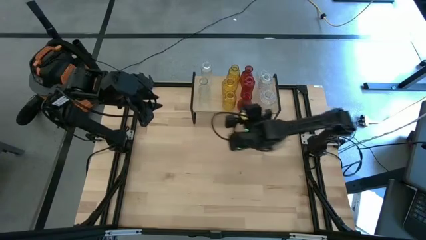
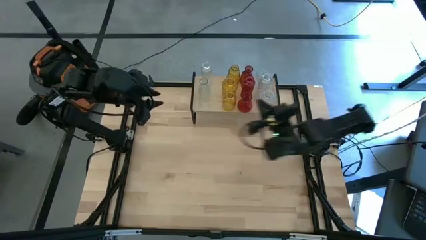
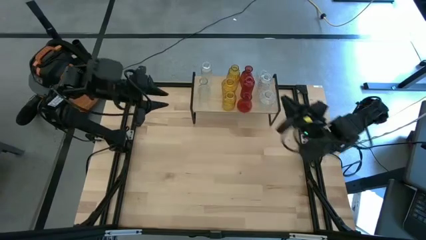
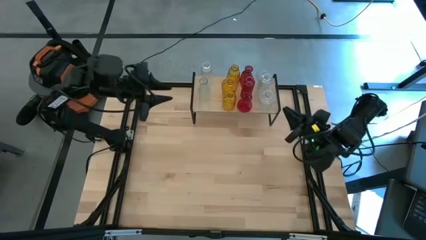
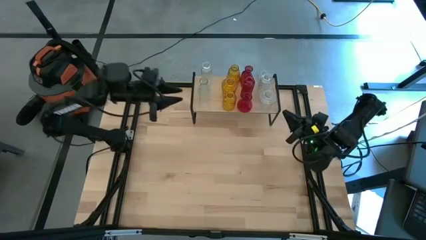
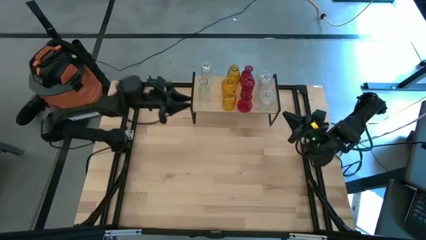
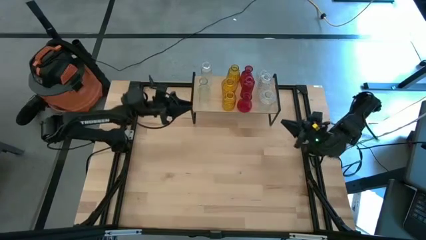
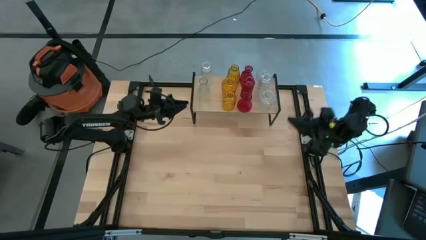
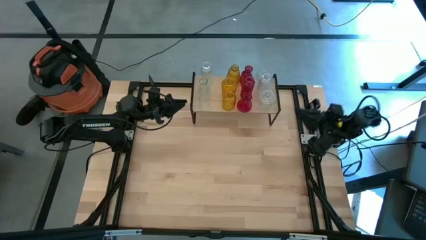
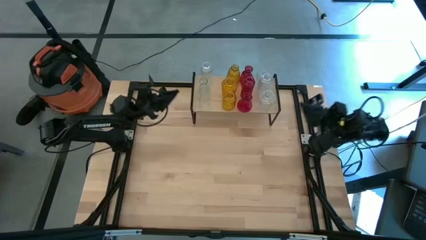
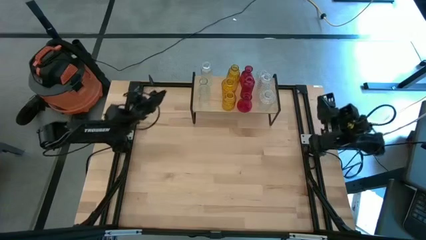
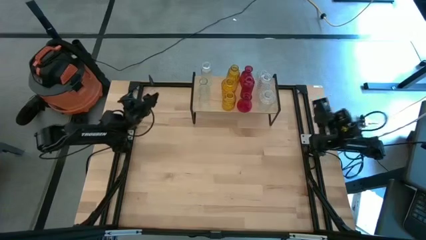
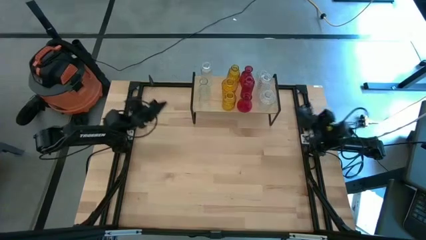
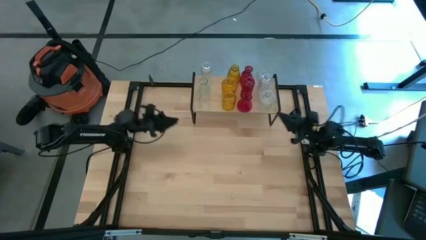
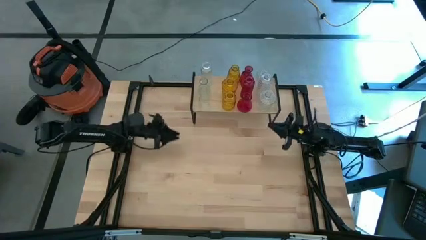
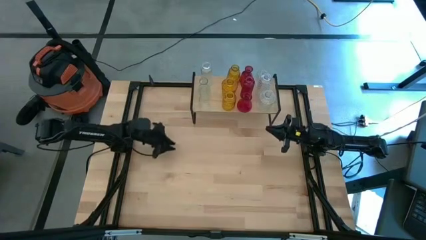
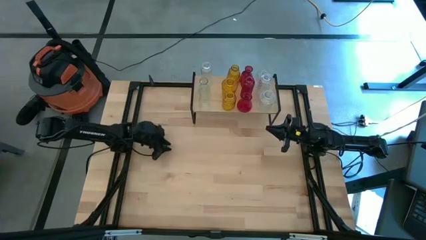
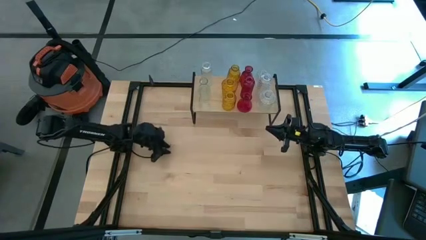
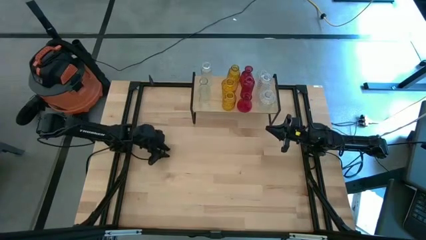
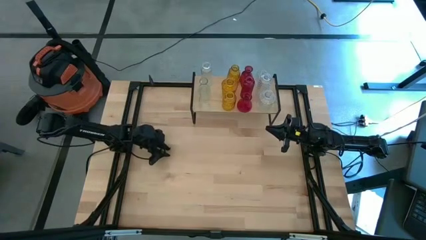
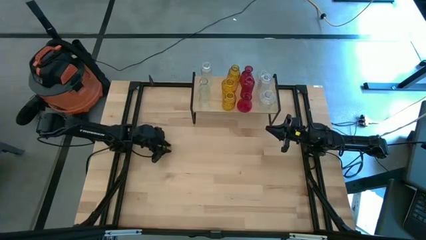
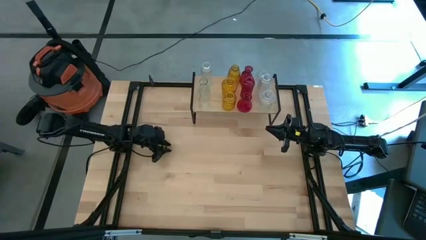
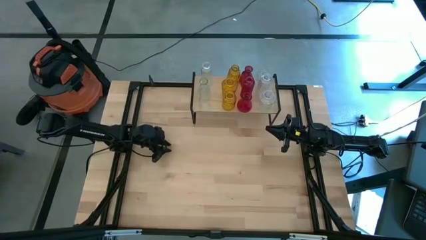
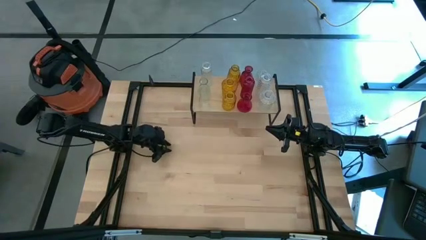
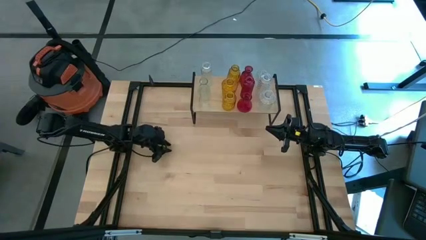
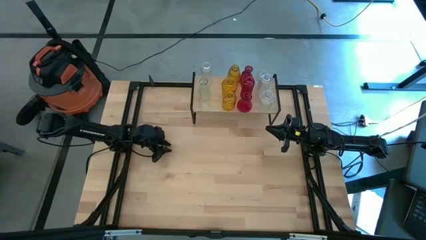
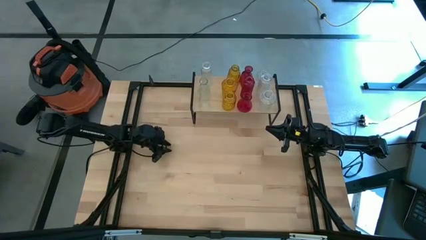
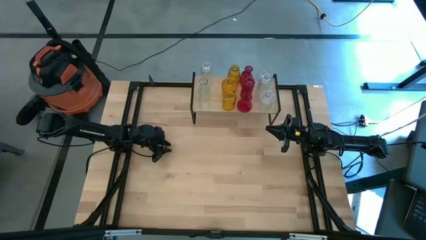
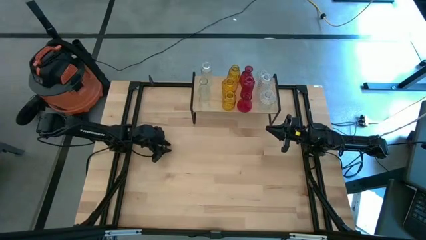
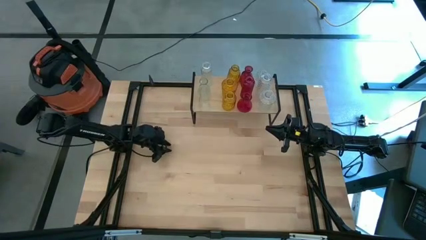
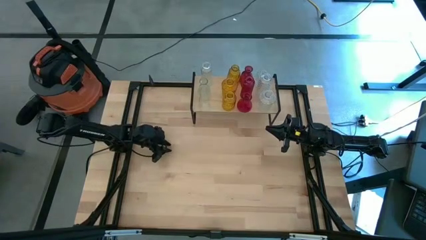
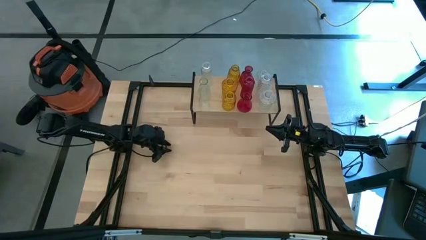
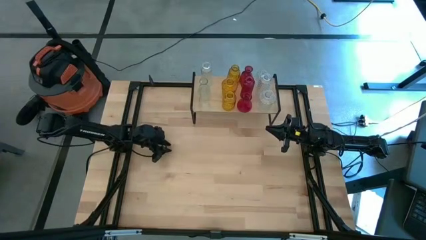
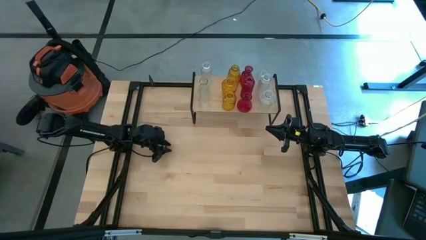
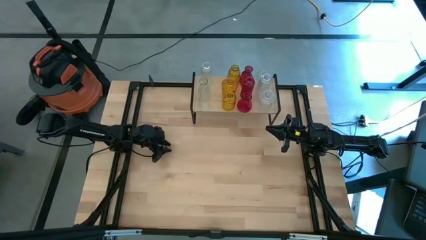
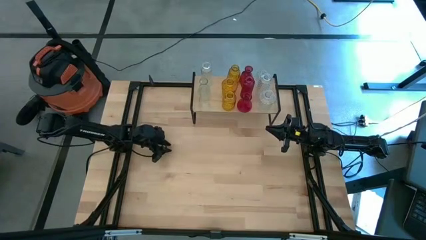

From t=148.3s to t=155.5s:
Task: sort vases onto shelf
Return to Home Position

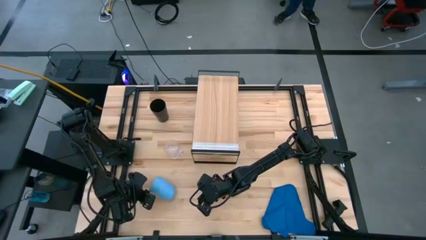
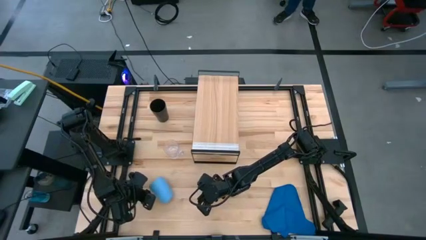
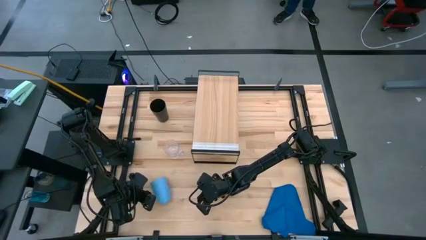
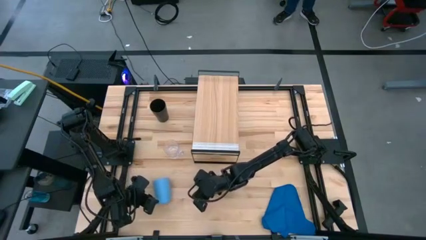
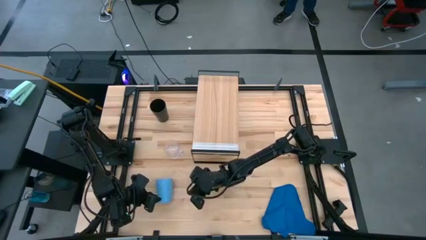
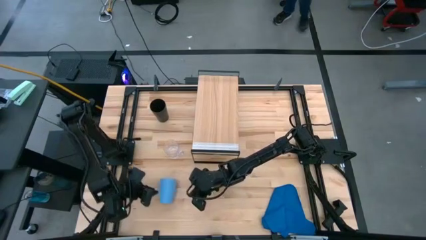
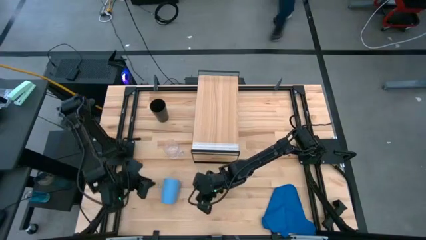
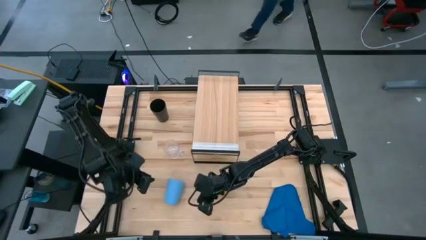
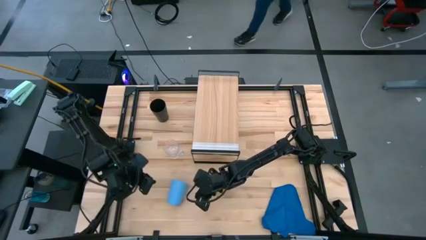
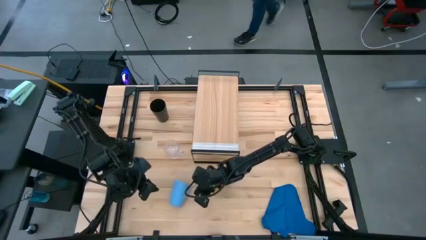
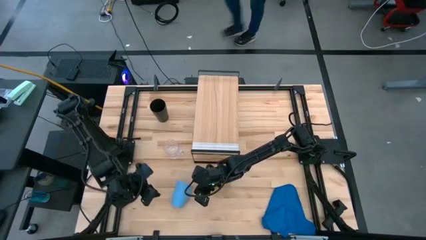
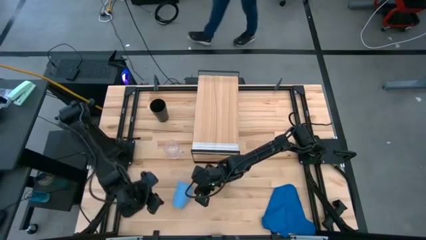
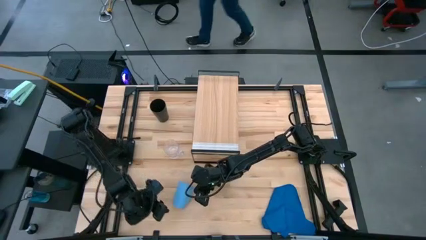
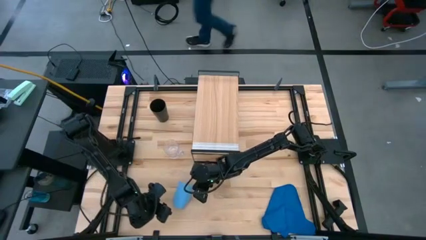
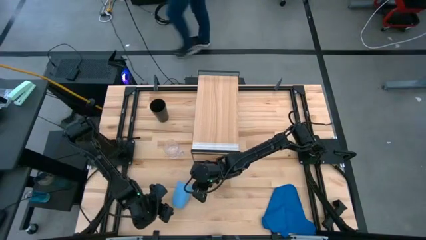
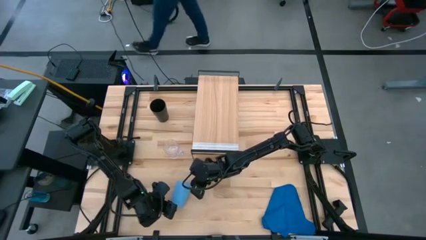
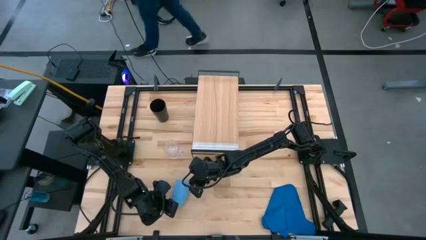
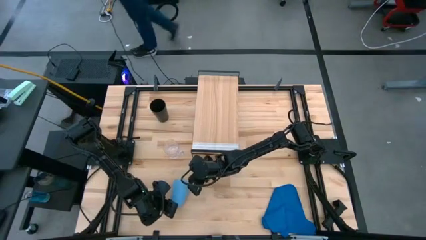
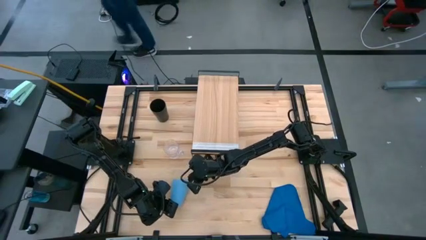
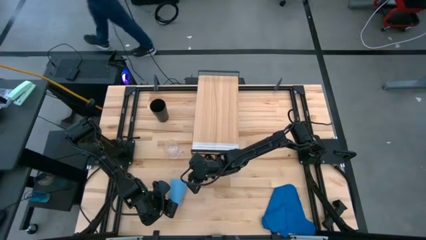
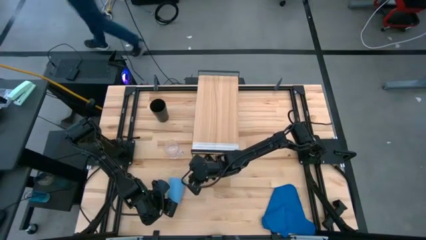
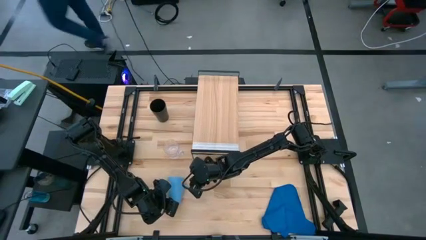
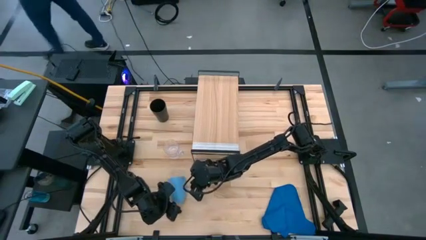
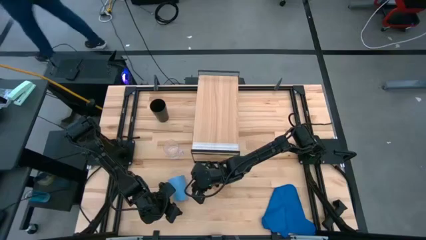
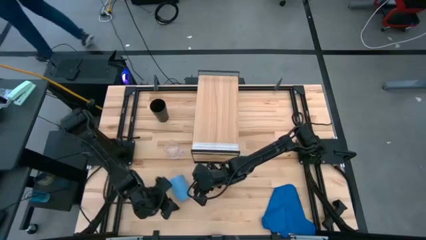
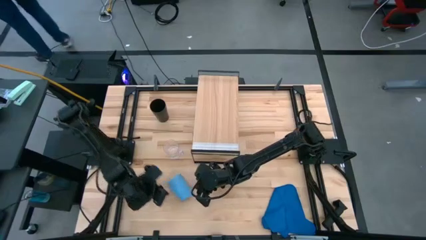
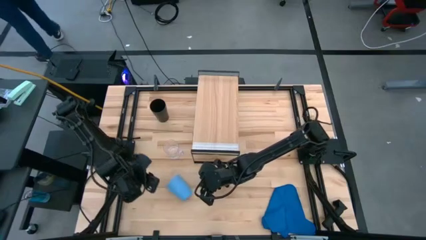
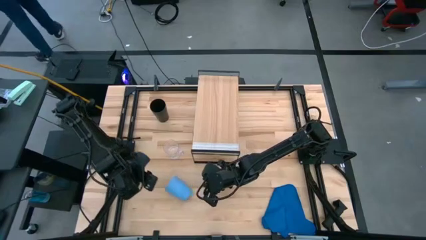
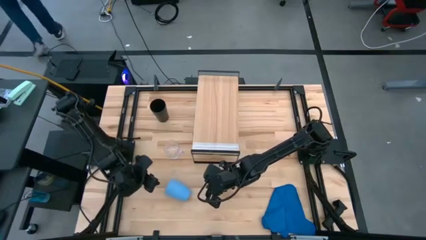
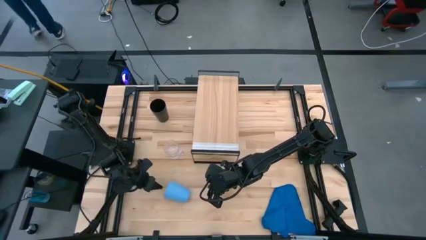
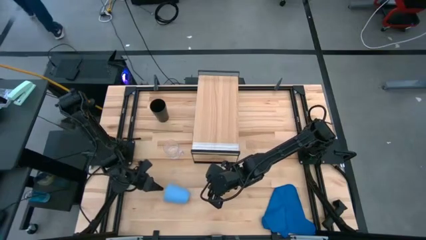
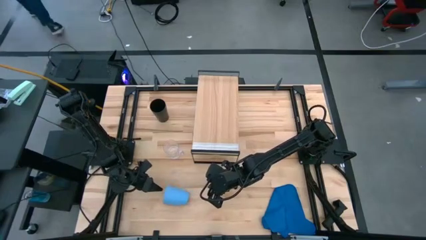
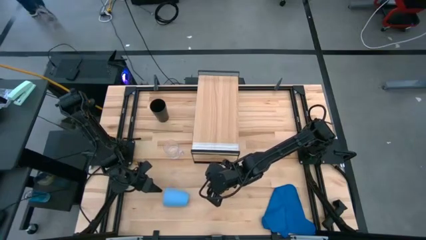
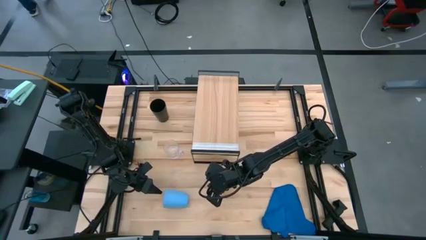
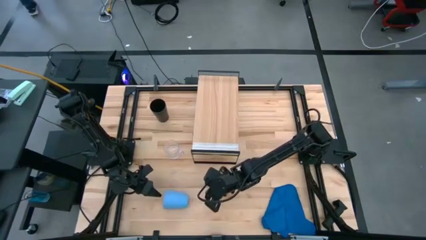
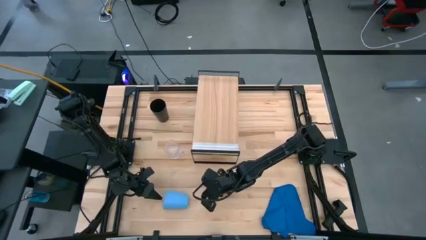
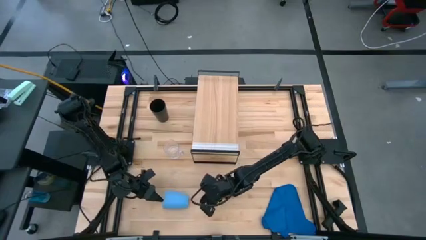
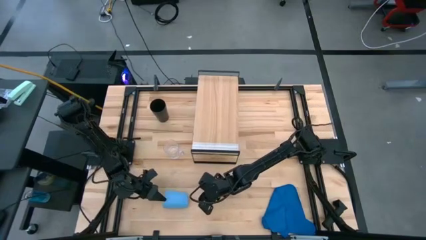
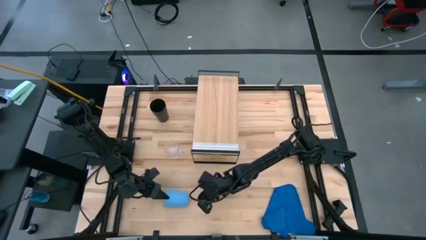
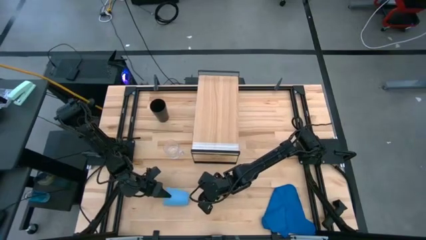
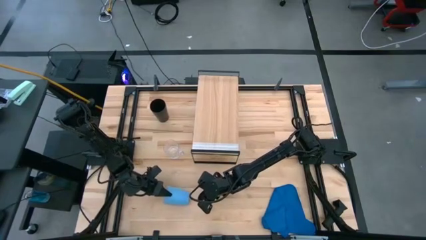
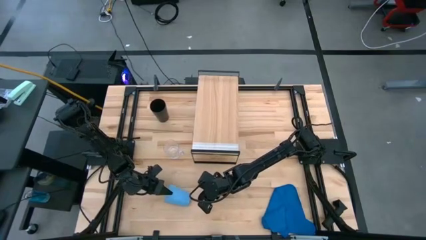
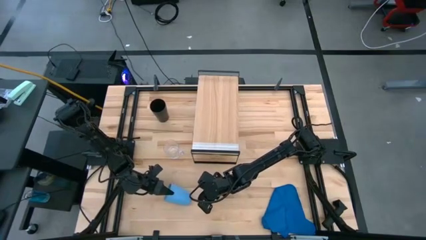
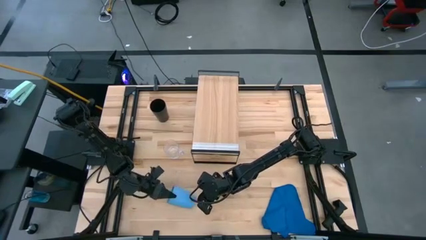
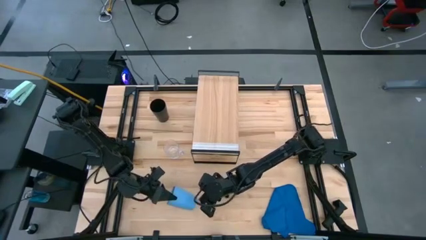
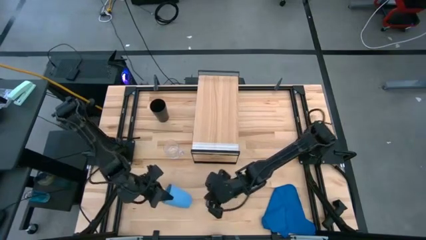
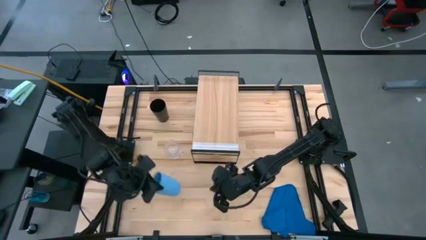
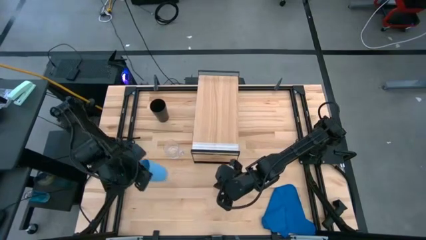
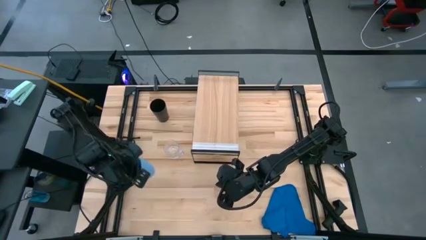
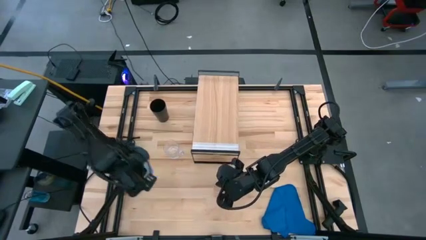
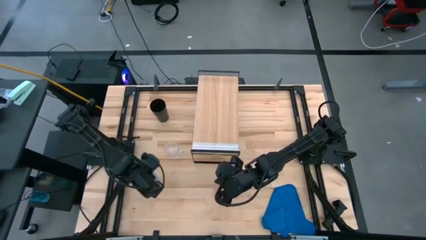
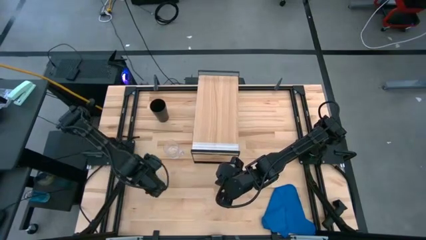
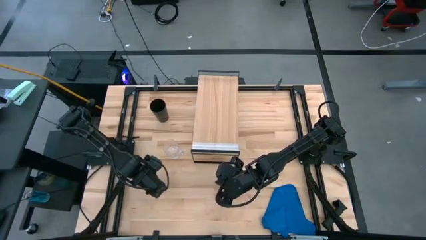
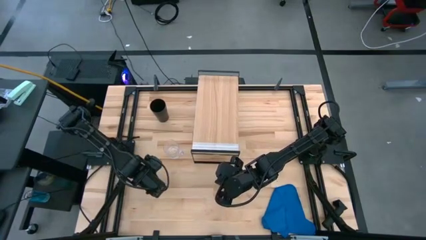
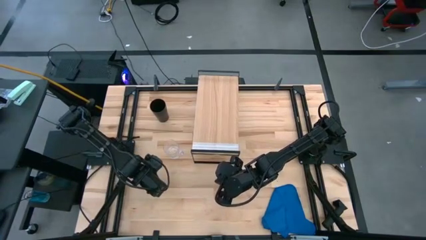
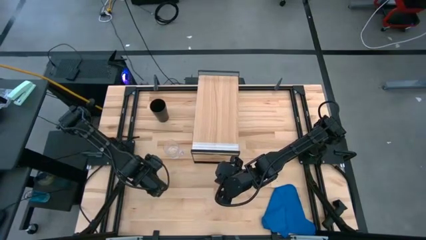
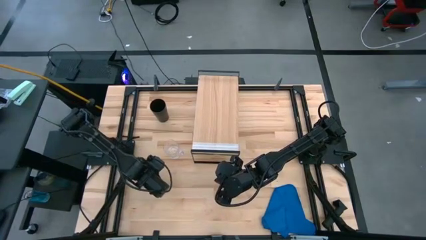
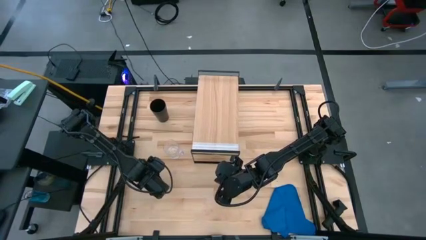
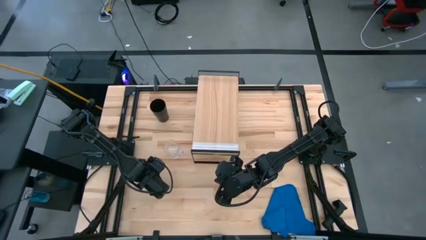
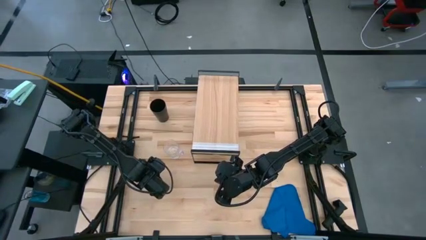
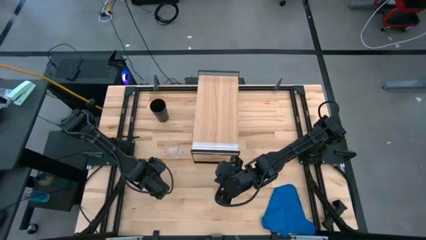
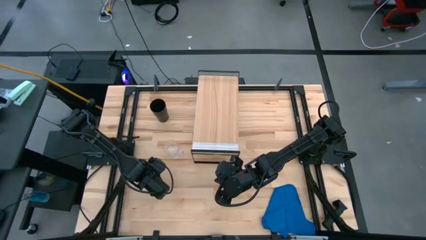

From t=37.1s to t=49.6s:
Task: Stack small to large cups/mugs on shelf
Move the blue cup to the middle left of the table
